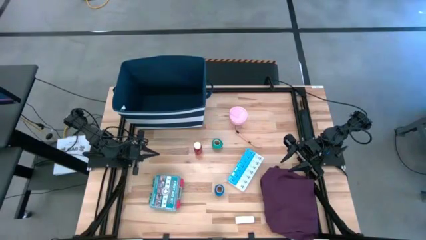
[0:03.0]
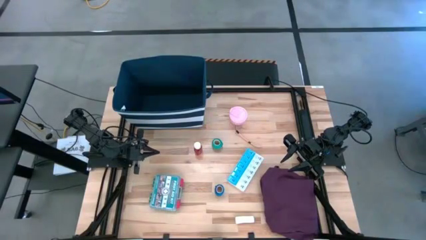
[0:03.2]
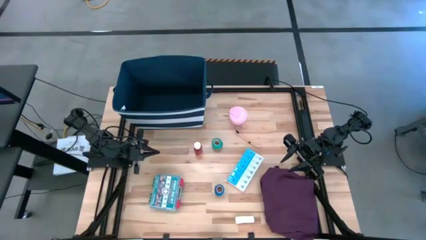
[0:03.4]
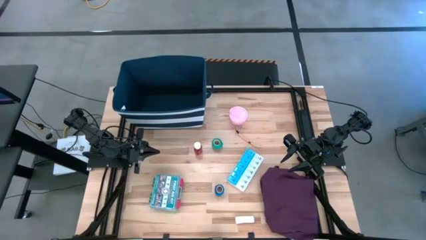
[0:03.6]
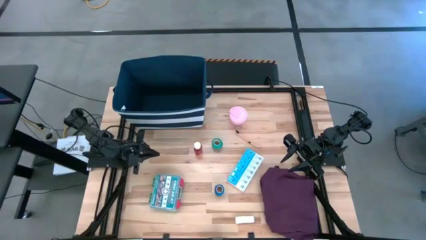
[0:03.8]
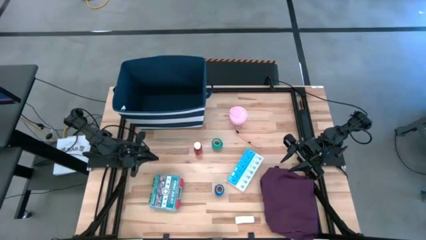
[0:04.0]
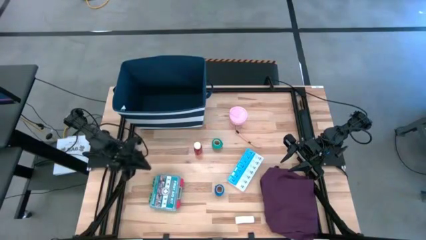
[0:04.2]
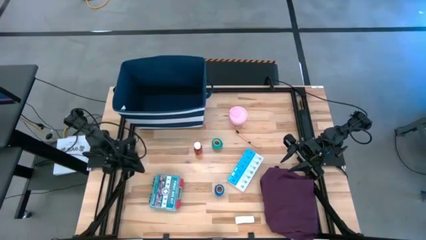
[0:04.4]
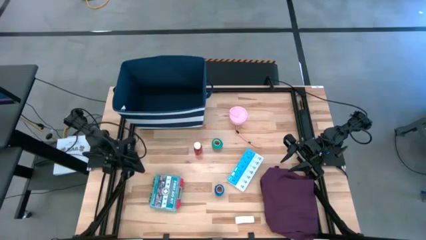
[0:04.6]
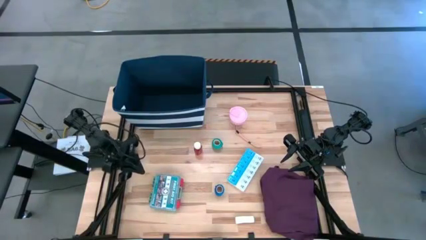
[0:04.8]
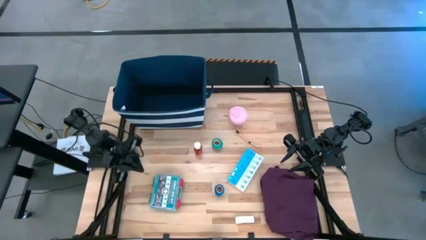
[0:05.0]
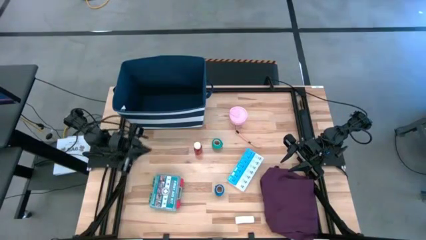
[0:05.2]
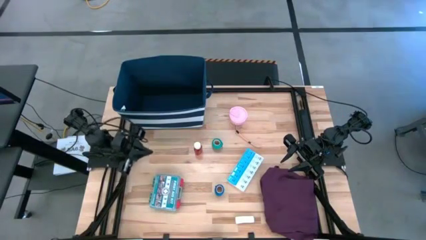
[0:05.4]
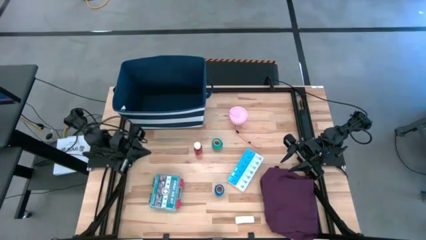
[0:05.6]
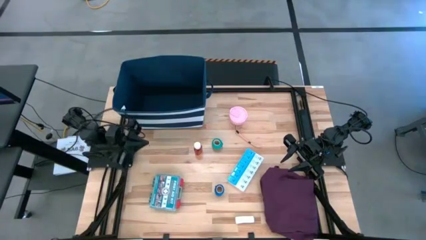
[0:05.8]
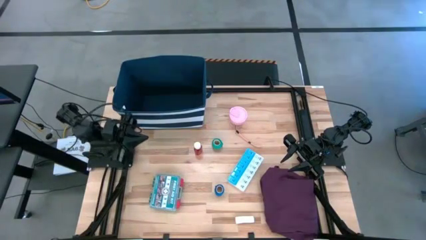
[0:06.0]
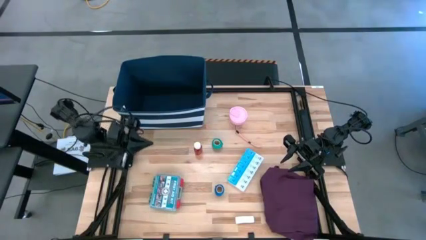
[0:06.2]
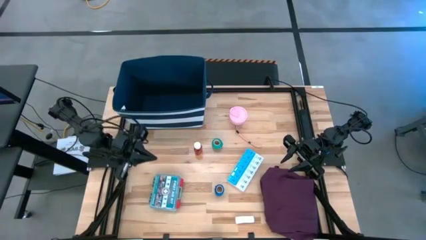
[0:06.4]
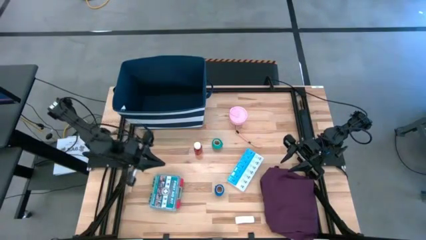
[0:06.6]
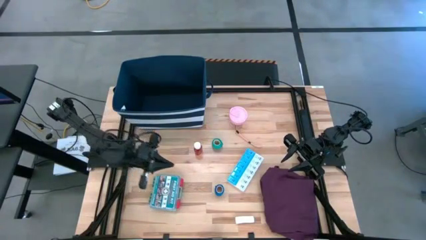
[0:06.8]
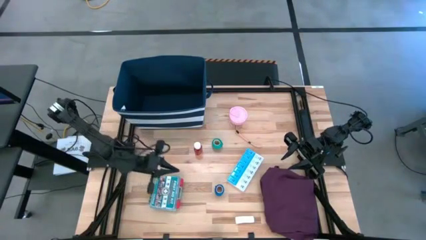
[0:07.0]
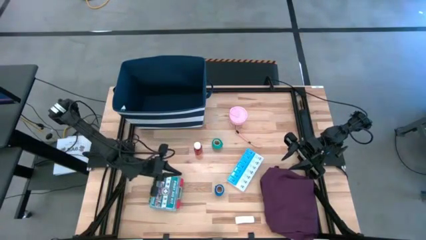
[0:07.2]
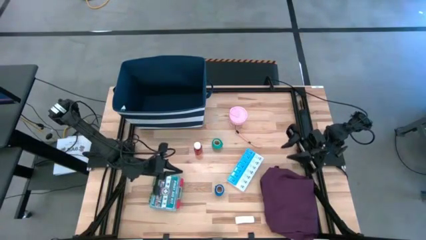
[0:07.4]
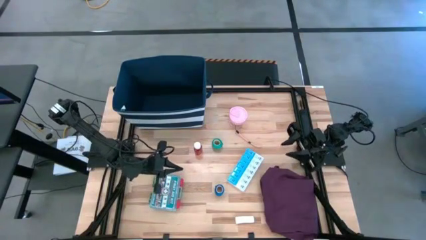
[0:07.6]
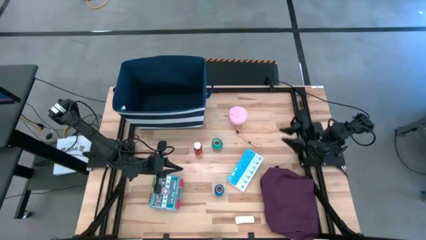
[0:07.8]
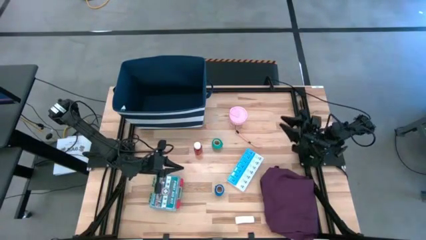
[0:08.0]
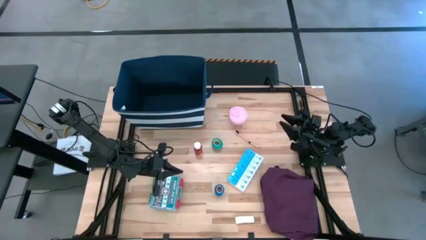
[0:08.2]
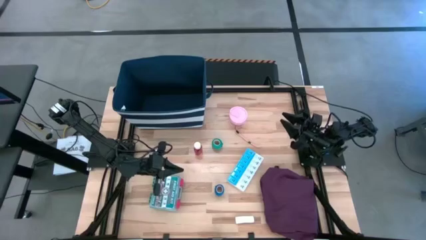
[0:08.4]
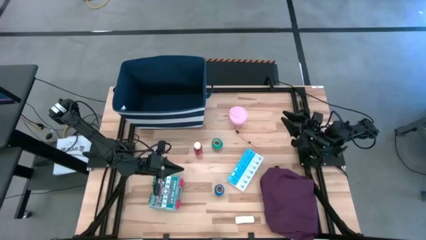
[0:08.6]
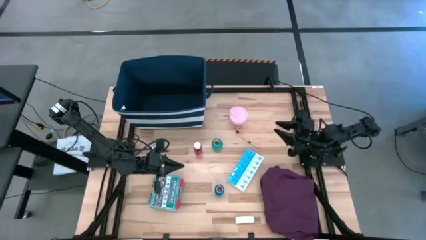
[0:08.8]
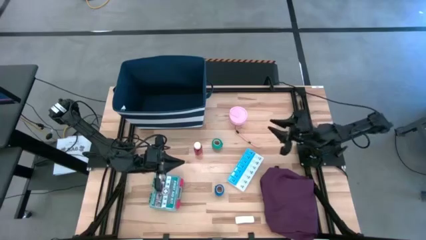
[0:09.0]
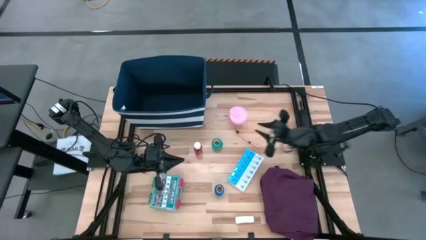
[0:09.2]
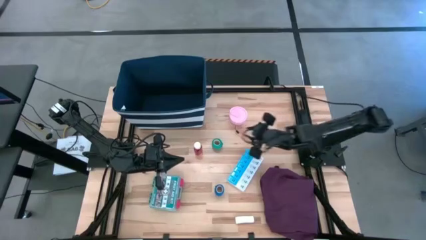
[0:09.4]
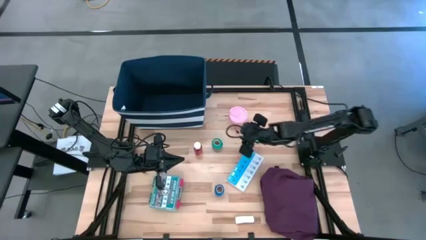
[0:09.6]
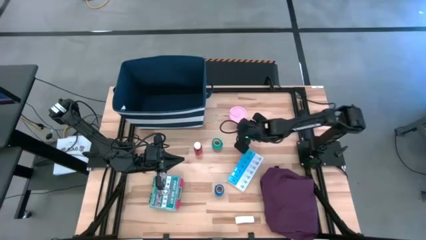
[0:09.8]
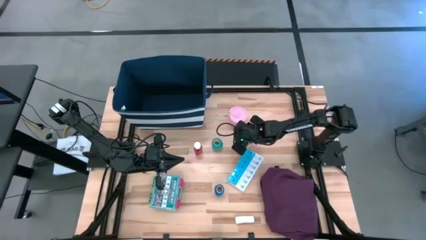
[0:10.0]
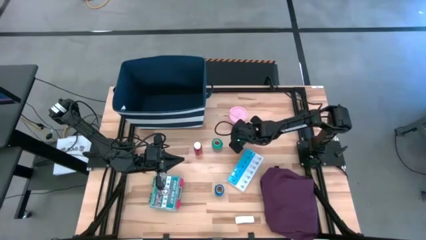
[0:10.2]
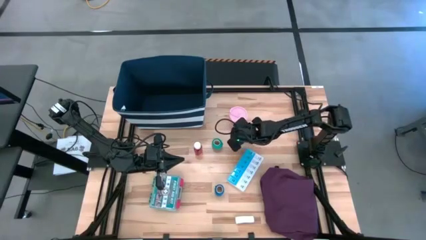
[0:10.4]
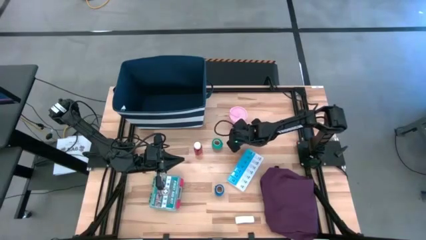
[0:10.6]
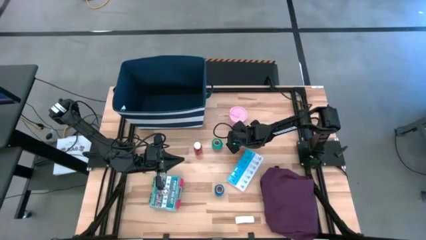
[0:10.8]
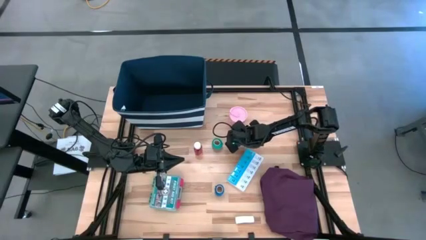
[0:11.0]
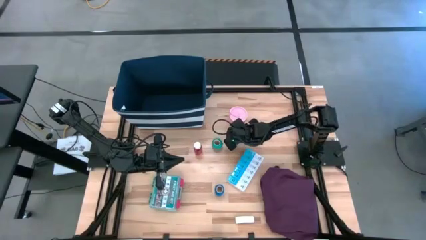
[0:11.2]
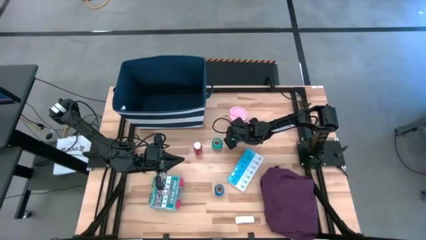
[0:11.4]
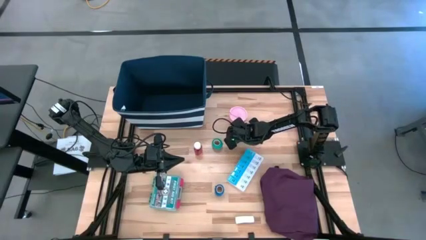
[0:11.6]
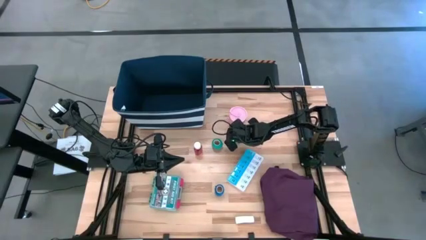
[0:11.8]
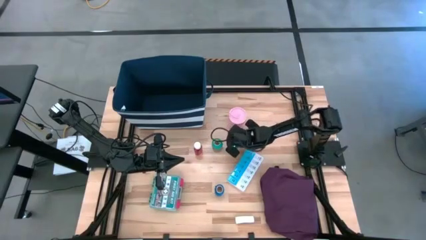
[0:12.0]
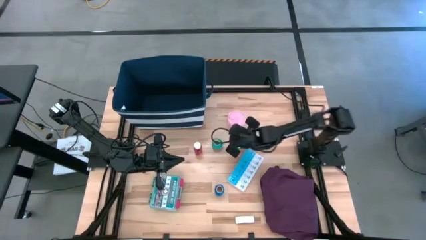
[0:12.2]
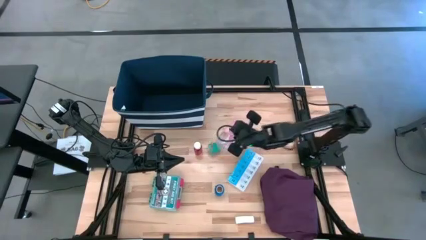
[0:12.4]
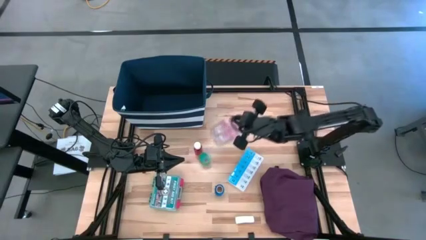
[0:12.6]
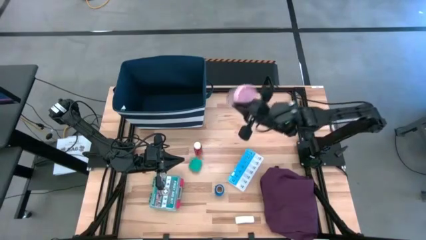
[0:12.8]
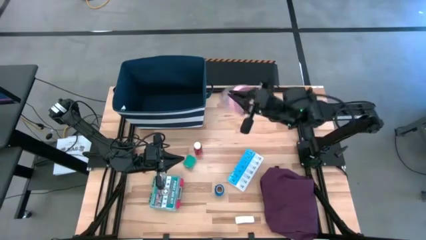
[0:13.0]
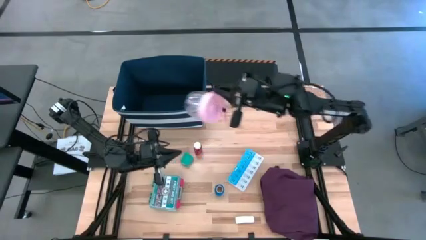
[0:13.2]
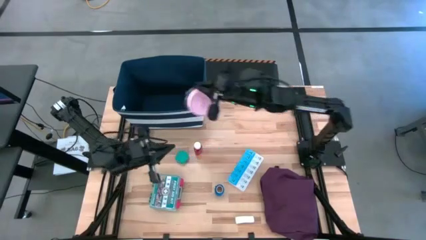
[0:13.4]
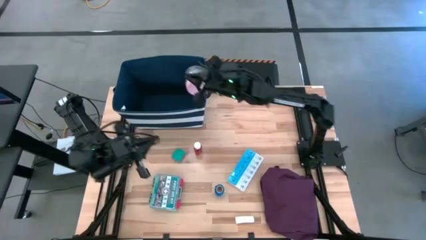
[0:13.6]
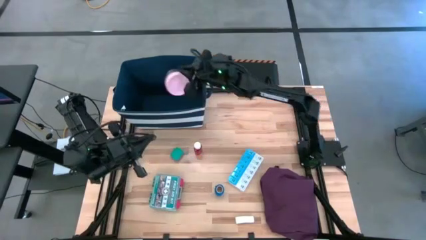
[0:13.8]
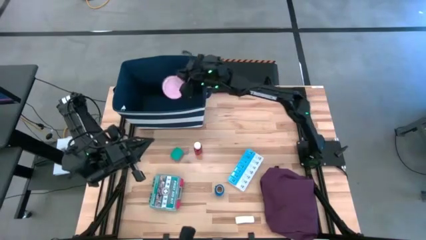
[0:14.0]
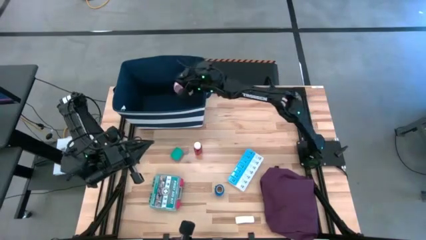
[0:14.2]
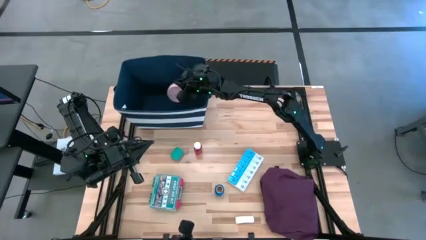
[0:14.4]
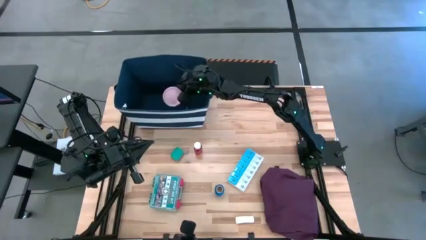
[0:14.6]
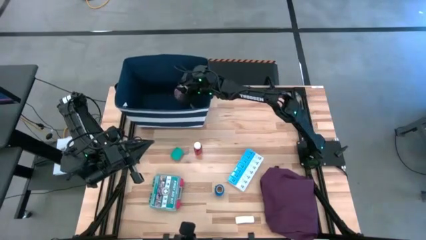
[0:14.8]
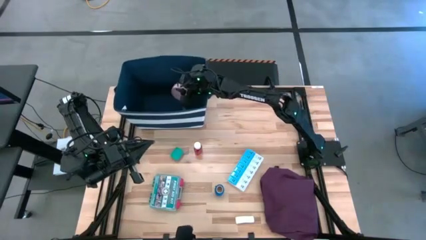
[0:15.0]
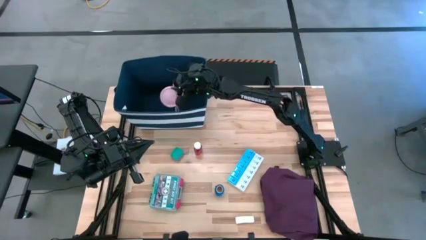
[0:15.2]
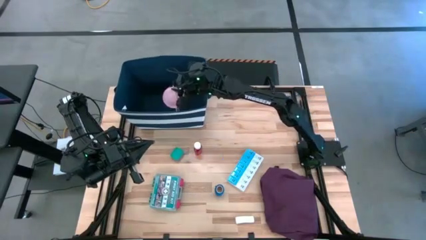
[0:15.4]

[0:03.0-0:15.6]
Task: Pick & place medical supplies in basket/bin
Put the pink container into the blue bin

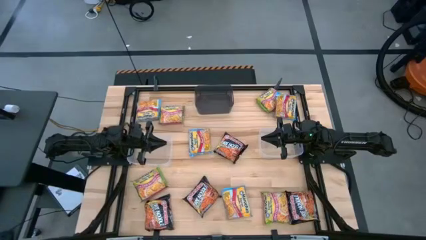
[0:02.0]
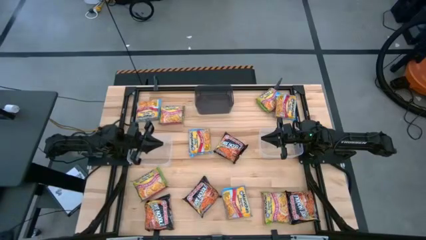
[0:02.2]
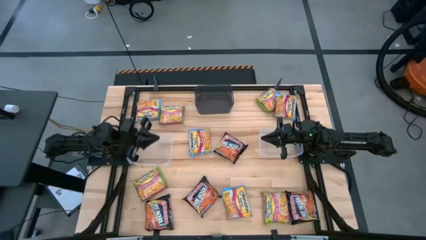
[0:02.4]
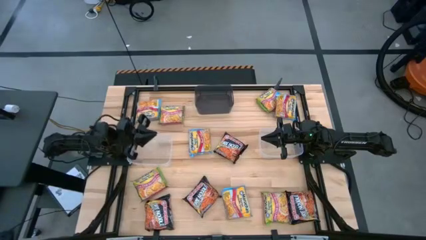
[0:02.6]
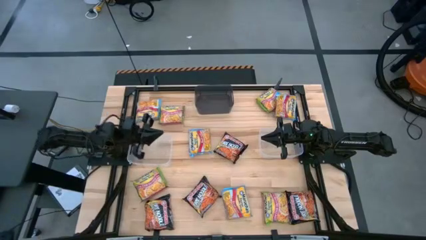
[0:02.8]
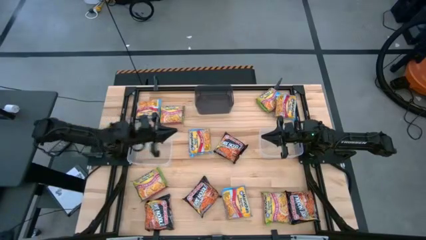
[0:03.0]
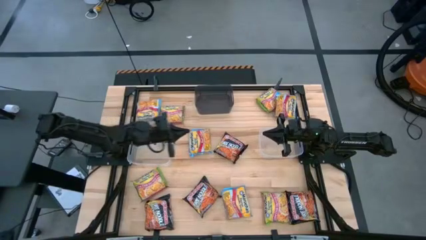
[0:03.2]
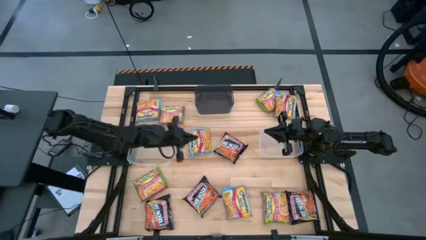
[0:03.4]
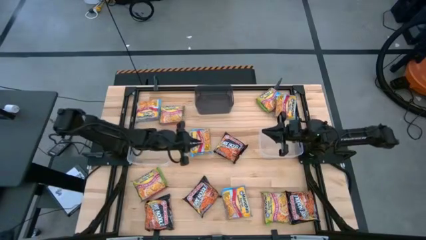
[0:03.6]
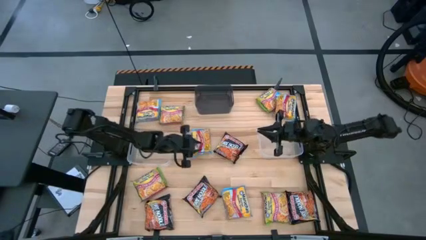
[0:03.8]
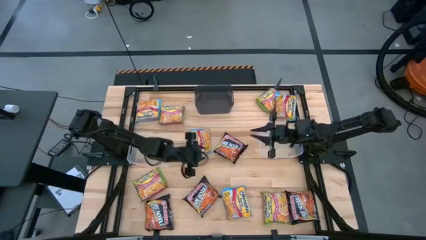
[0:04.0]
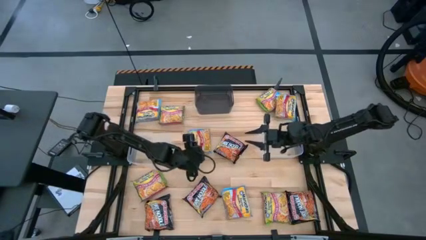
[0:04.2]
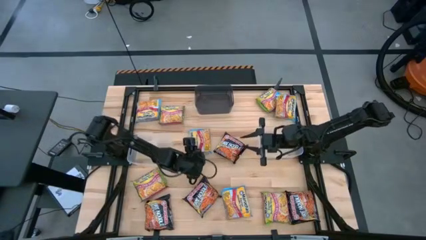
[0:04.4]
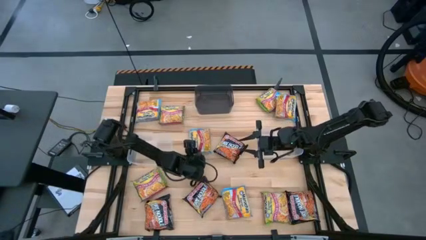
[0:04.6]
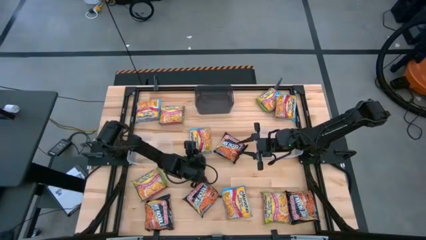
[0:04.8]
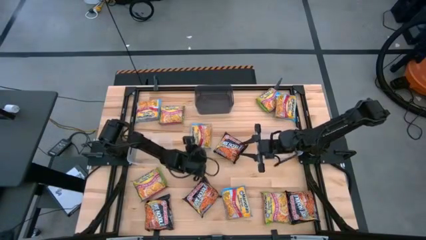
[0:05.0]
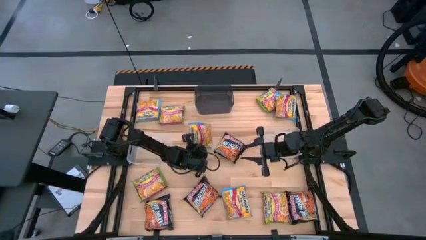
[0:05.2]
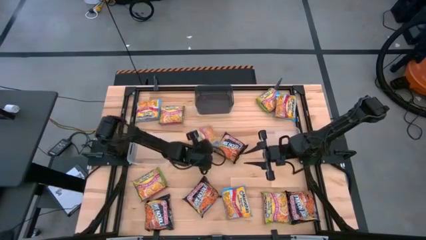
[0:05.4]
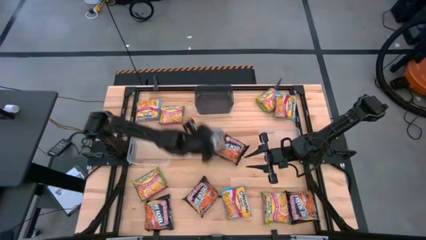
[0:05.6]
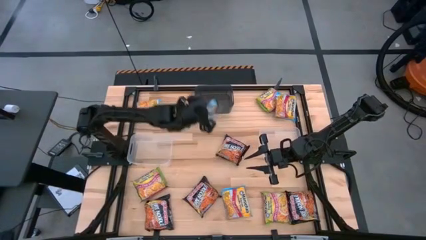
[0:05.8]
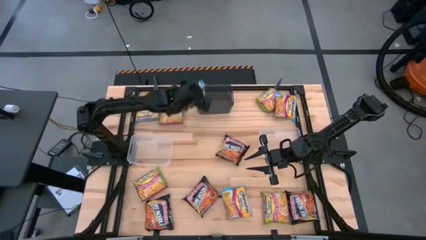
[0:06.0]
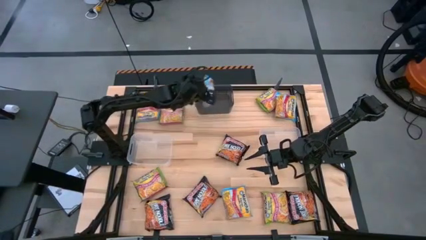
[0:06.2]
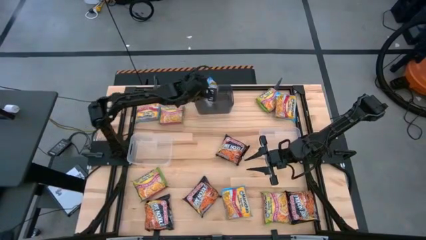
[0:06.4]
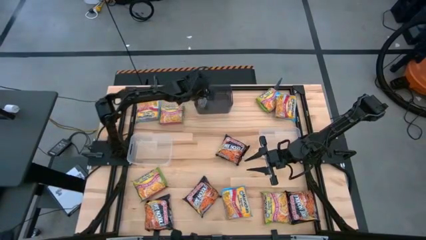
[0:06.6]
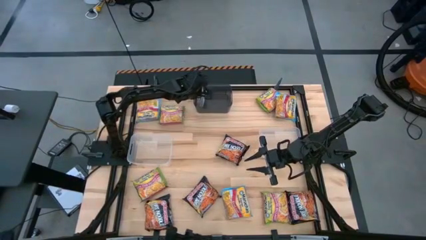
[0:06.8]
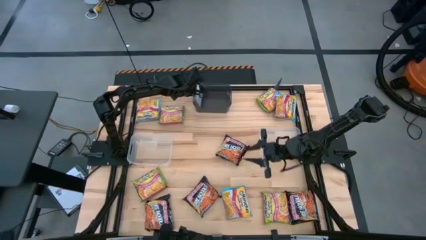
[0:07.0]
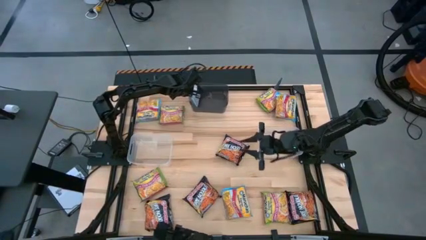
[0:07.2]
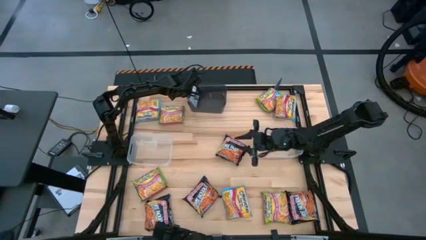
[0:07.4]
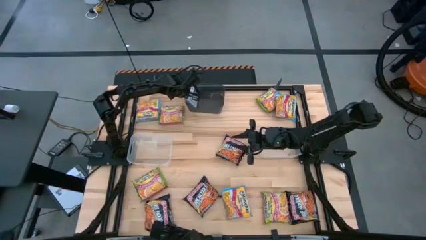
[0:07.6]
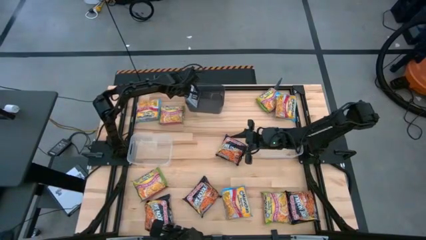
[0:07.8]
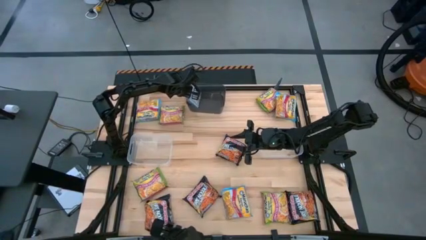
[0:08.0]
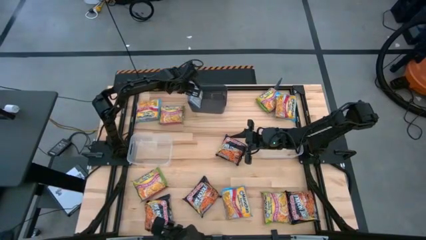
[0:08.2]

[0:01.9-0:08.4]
Task: Sort Maruchan noodles
Put the blue noodle pack into the black bin
